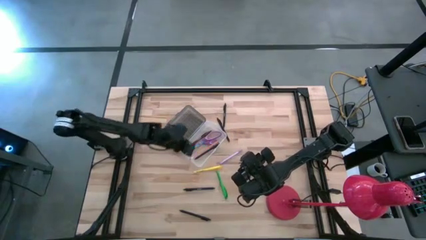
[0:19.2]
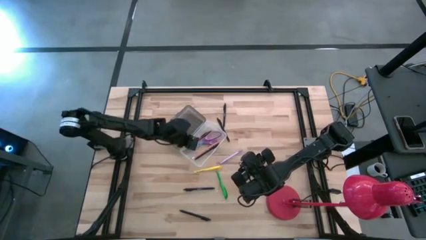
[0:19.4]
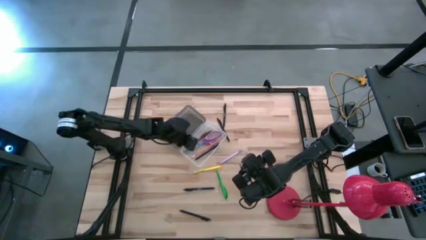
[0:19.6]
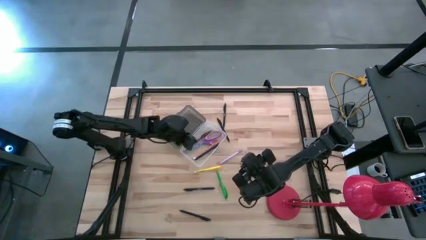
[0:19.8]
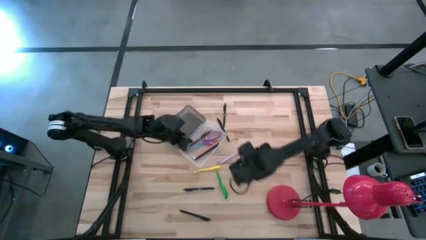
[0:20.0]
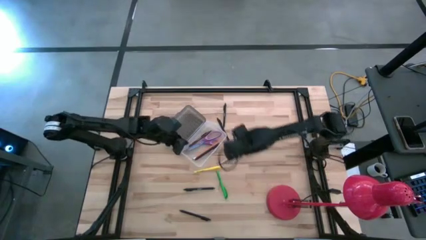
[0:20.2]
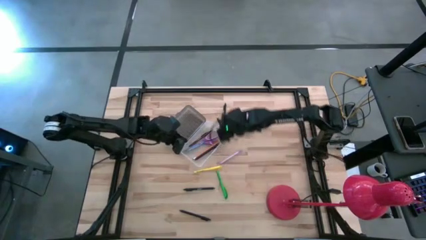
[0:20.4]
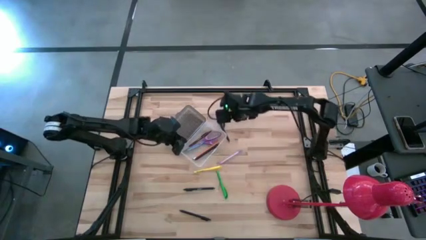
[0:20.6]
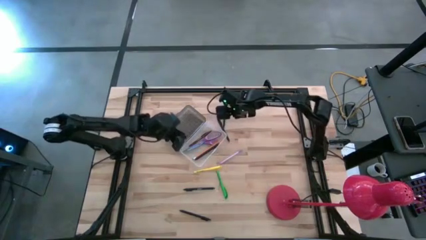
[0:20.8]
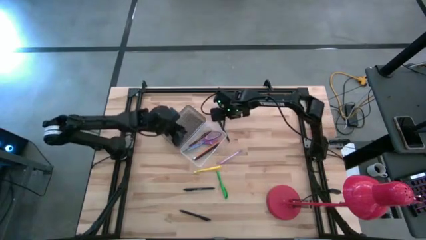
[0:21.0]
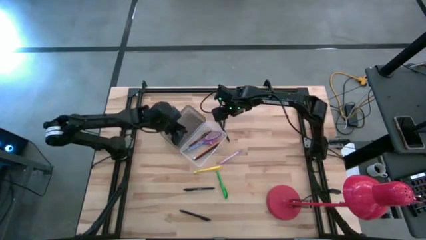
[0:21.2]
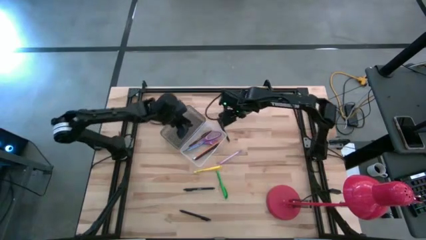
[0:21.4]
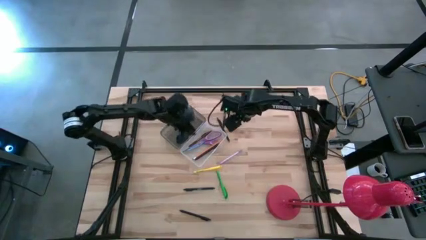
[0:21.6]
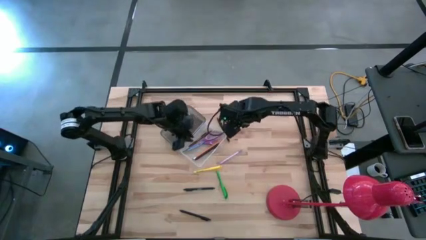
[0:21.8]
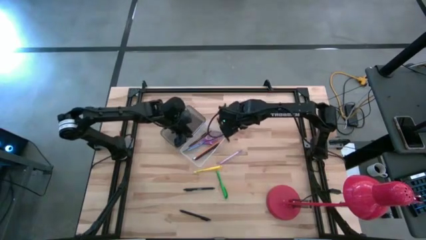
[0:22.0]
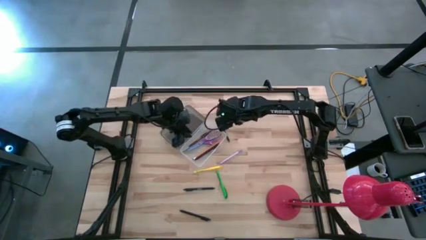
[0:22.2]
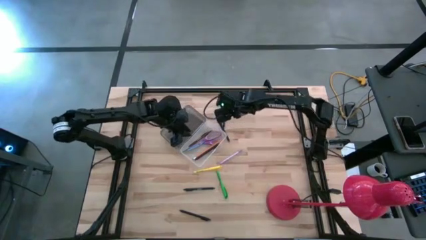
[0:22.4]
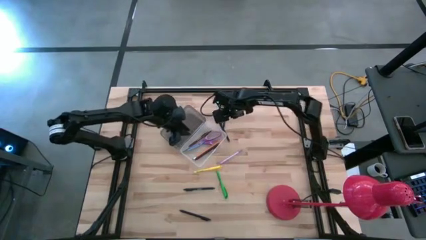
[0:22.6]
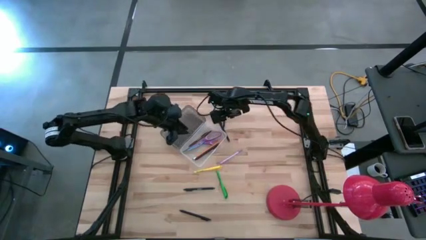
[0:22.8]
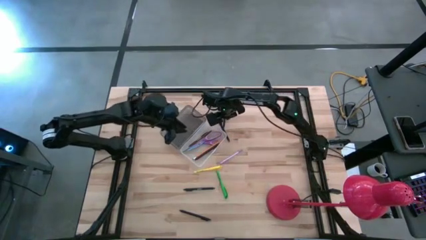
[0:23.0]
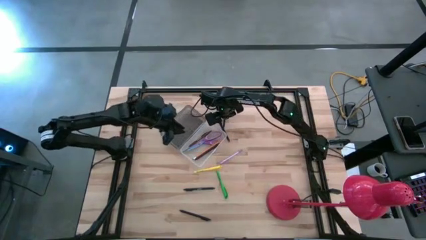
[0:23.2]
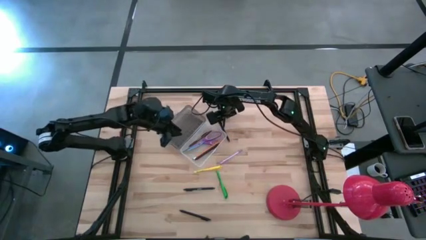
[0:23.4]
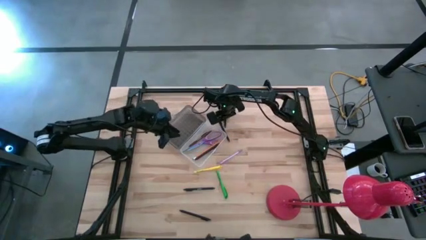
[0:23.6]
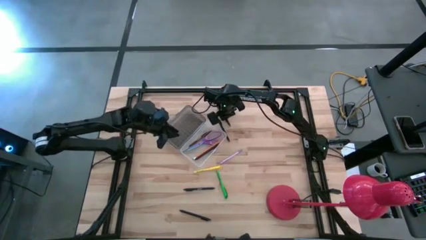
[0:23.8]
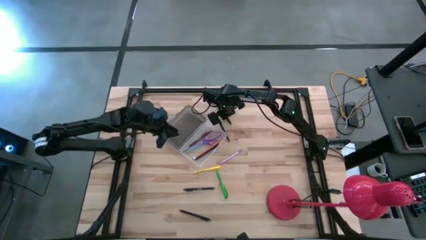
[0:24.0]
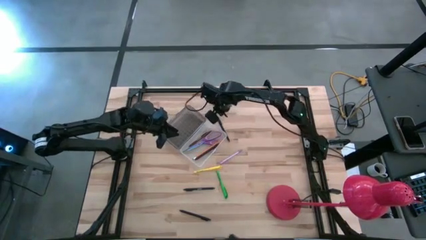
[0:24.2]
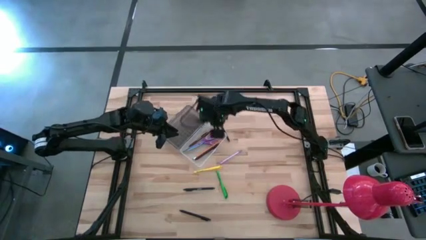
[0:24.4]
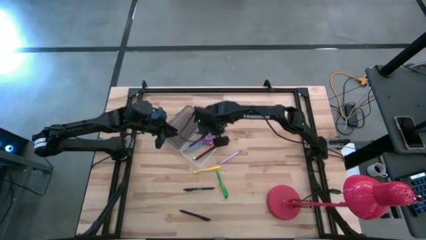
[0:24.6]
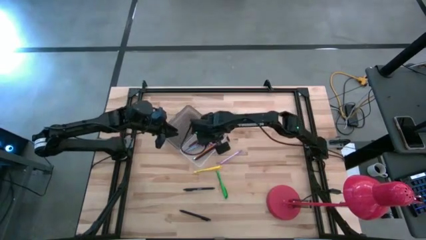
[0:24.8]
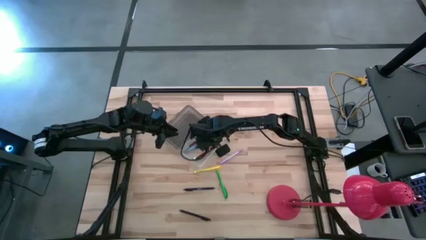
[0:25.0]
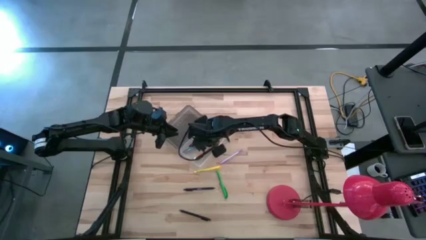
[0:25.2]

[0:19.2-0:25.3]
Task: Pick & place school supplies into a supply box
Put the black pen into the transparent supply box

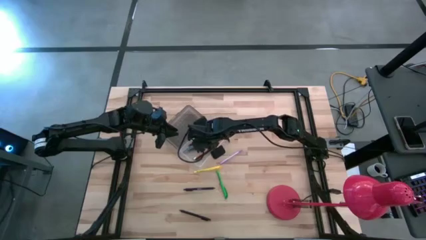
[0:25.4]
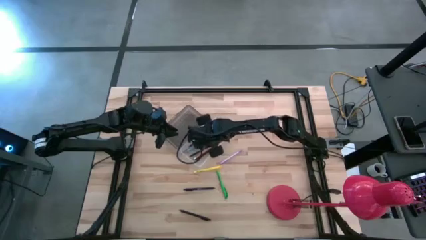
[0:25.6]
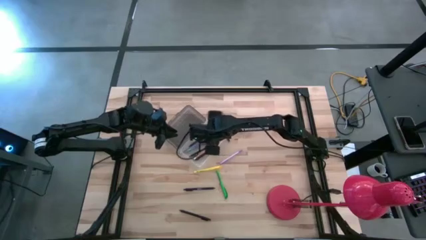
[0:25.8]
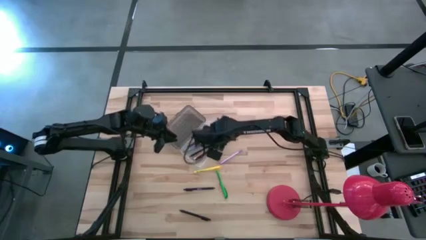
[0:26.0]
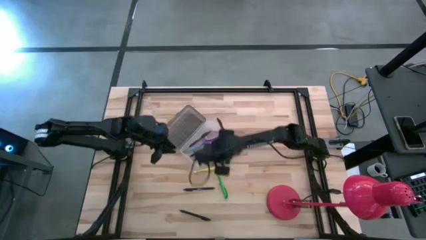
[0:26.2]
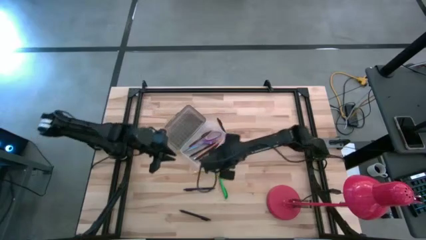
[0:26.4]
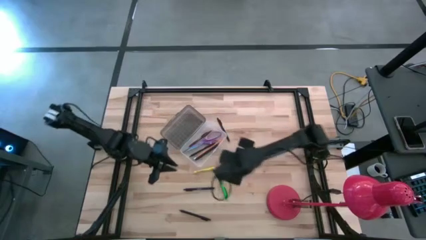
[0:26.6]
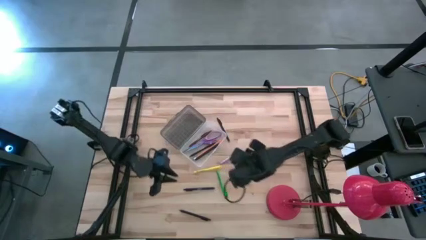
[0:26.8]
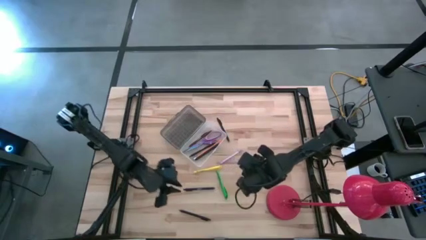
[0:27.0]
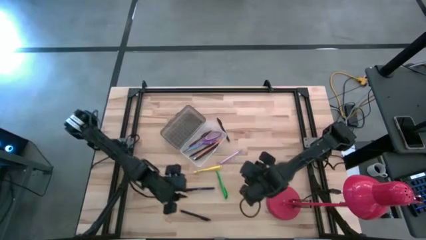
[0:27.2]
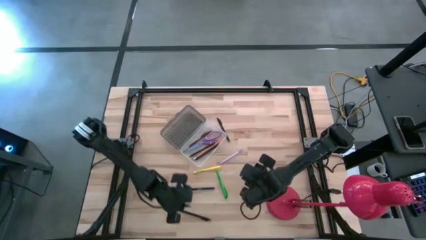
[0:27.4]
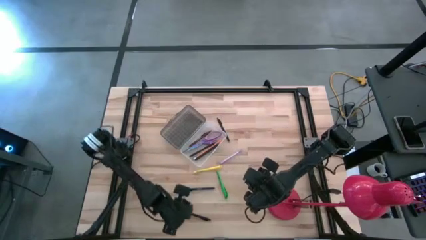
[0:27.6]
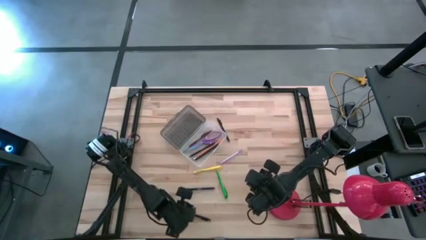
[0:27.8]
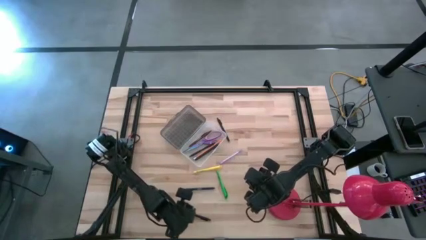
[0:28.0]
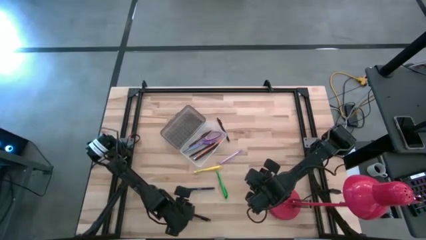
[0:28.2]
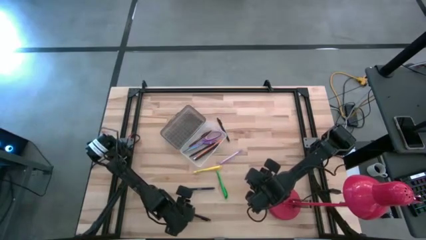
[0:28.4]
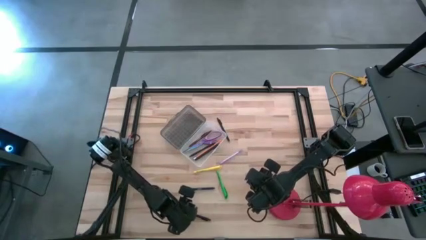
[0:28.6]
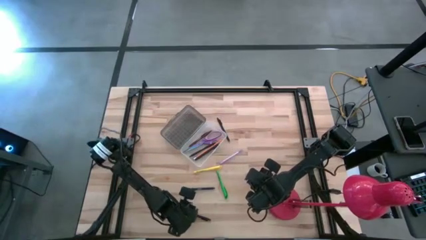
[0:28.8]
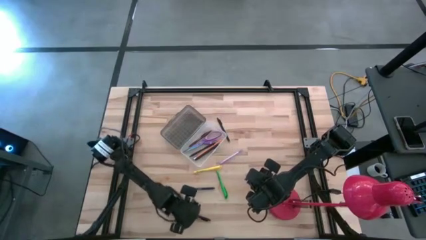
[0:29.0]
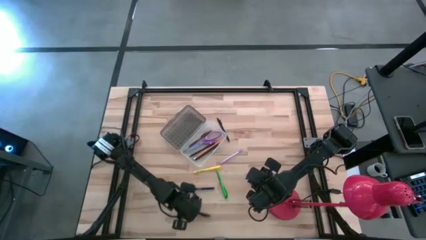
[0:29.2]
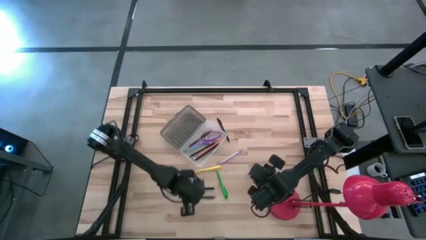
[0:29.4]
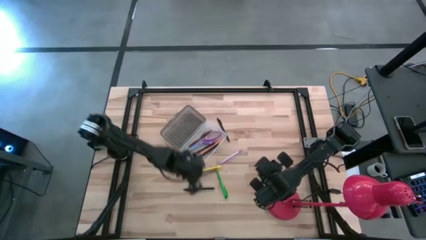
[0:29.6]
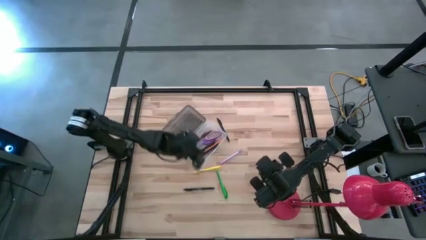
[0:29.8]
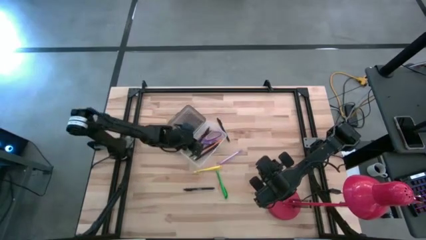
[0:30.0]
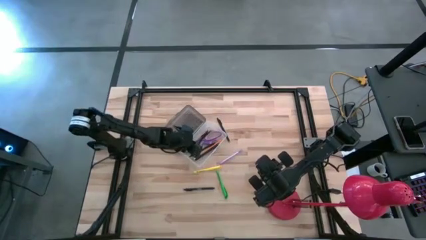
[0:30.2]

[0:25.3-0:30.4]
Put the black pen into the transparent supply box

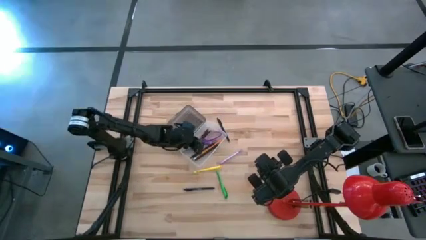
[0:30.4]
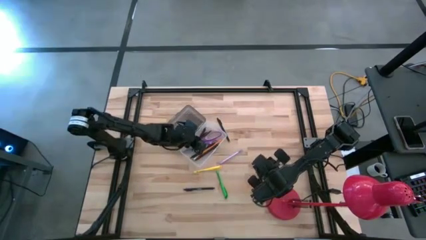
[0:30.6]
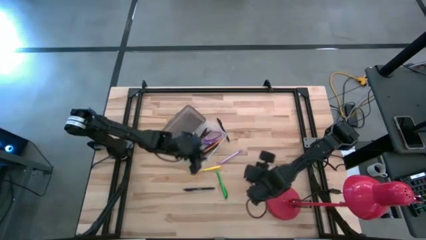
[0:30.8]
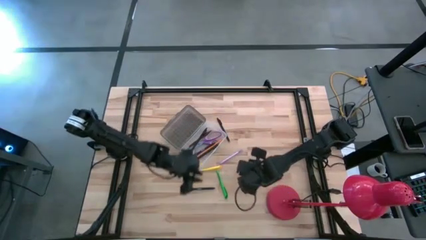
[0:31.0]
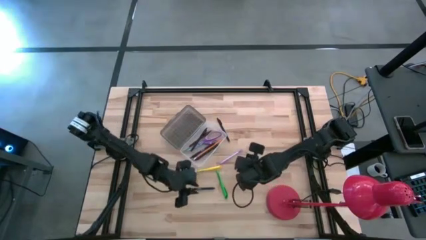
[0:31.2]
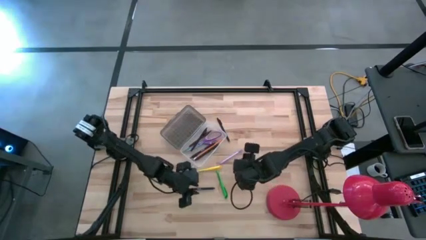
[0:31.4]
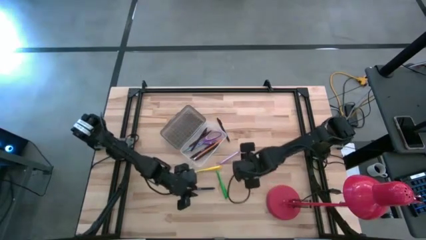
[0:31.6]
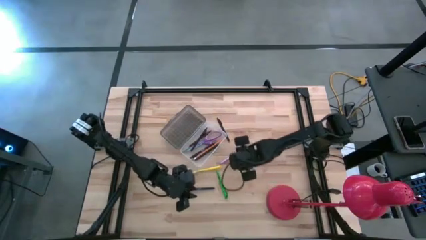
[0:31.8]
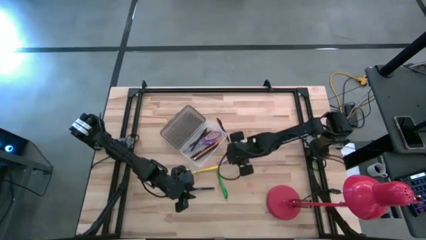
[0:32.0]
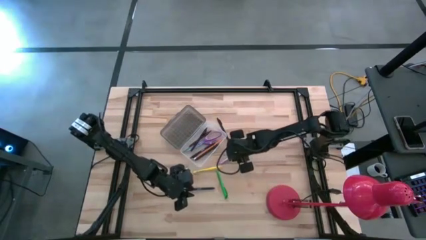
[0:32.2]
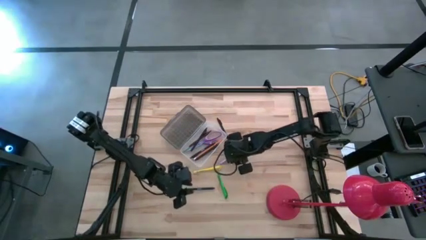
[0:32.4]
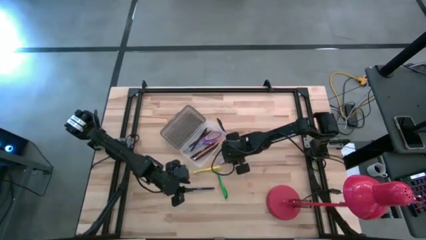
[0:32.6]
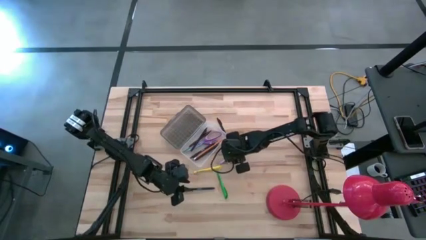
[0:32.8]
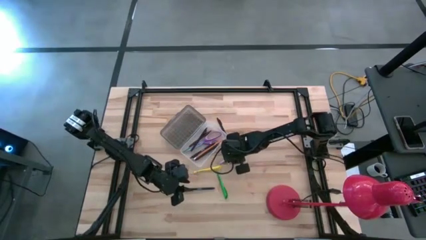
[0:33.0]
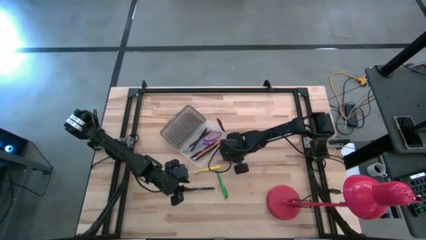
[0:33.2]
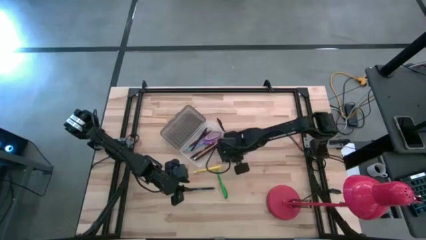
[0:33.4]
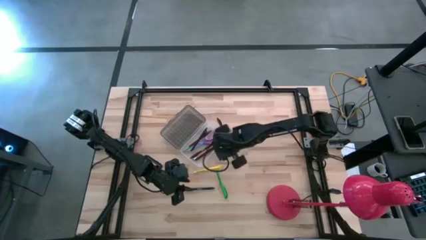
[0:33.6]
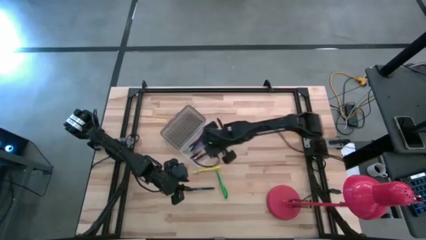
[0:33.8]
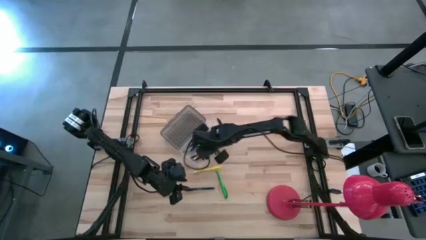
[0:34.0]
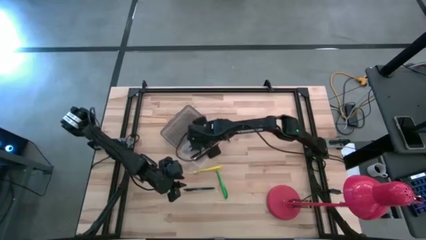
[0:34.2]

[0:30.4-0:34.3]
Put the violet pen into the transparent supply box

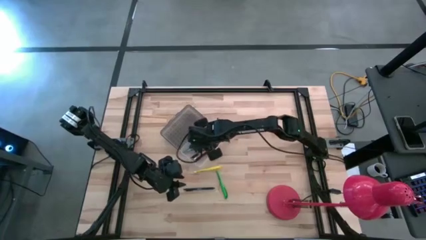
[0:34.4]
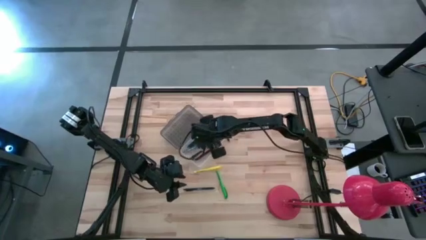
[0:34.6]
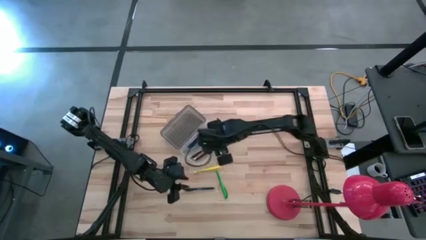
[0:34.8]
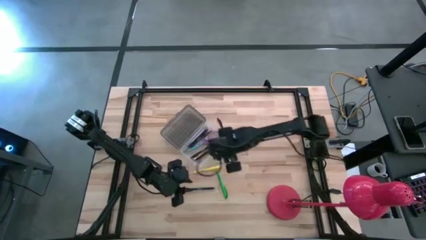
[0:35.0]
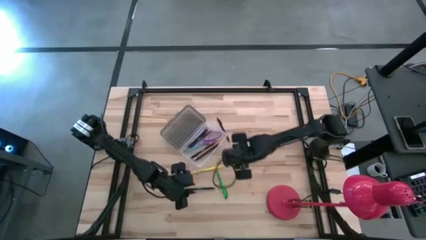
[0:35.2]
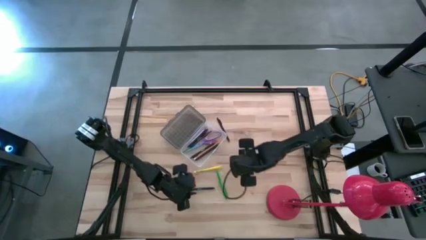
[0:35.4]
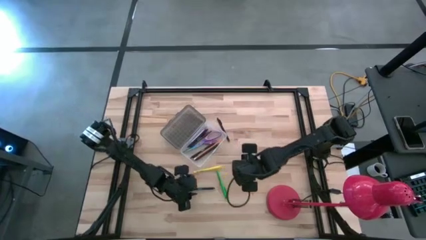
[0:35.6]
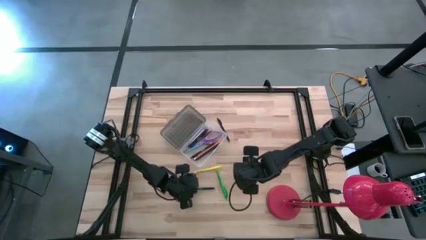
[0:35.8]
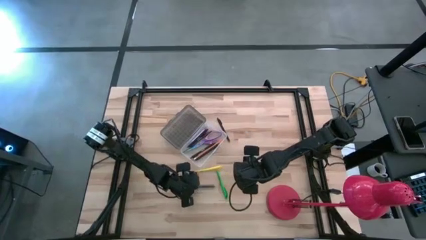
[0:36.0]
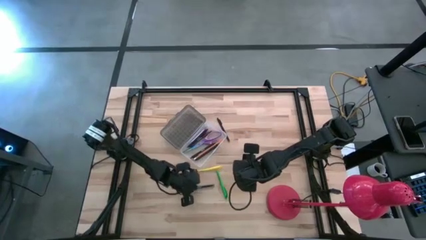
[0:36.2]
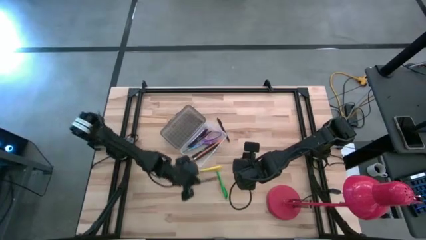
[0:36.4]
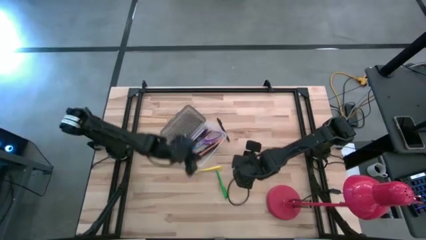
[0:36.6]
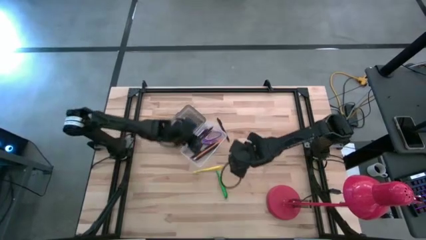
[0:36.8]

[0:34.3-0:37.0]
Put the black pen into the transparent supply box
